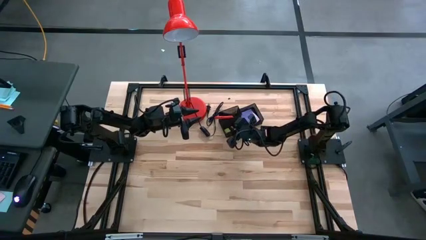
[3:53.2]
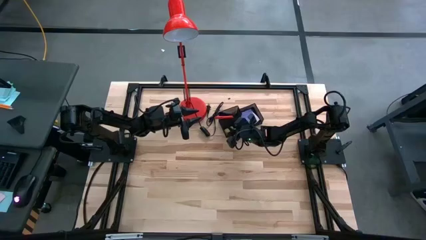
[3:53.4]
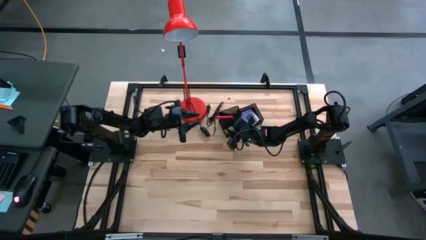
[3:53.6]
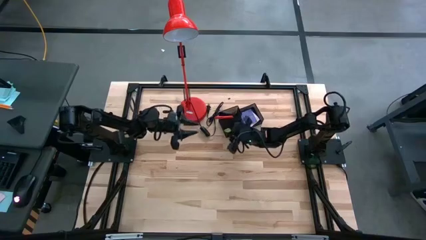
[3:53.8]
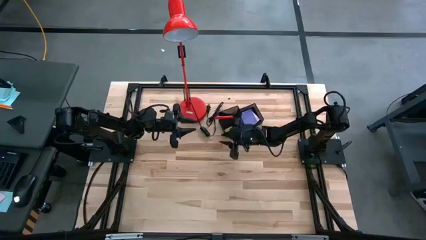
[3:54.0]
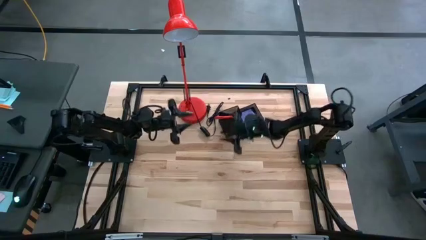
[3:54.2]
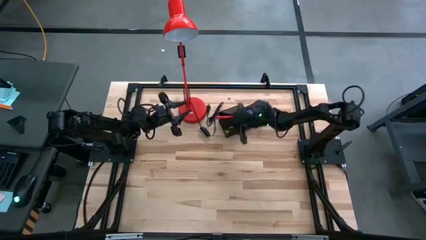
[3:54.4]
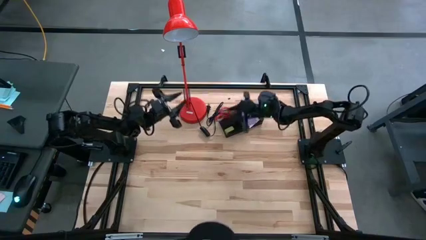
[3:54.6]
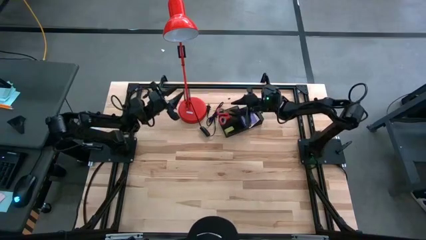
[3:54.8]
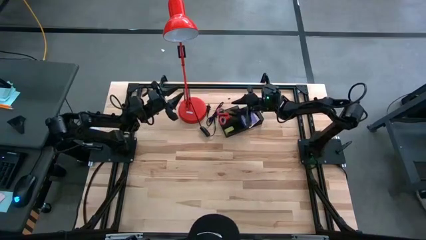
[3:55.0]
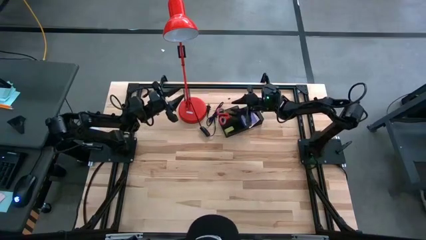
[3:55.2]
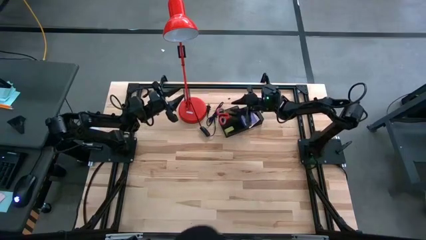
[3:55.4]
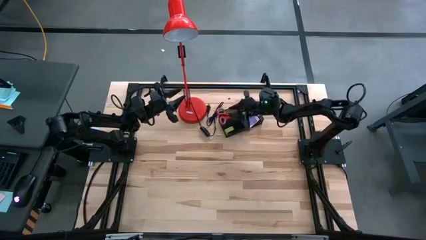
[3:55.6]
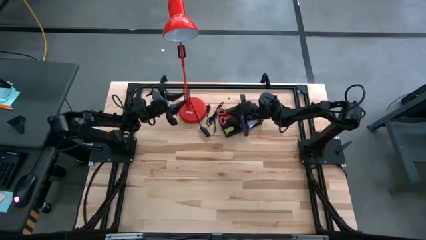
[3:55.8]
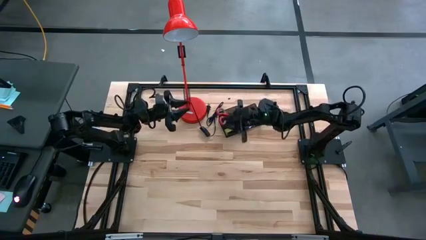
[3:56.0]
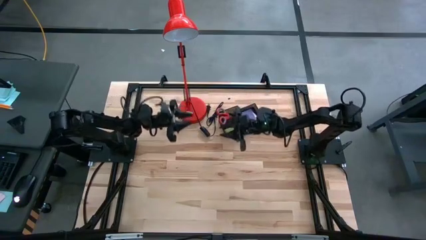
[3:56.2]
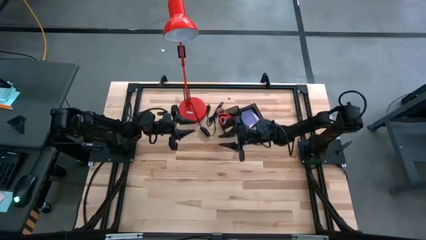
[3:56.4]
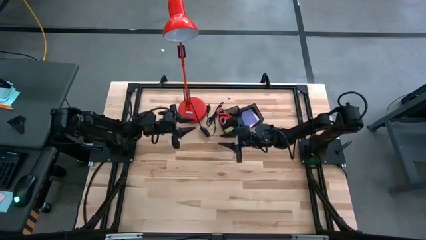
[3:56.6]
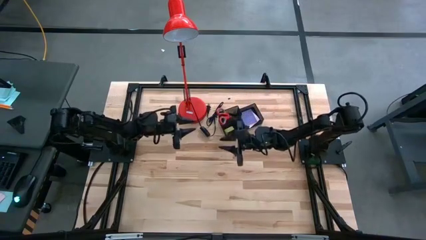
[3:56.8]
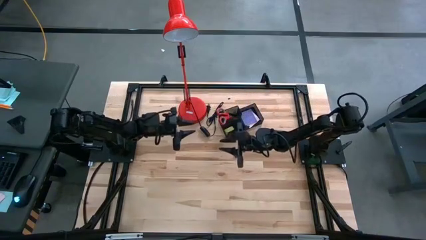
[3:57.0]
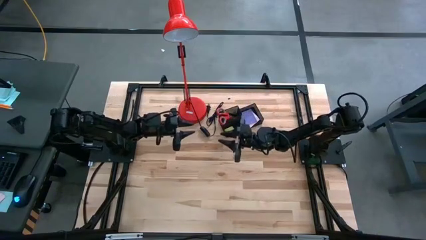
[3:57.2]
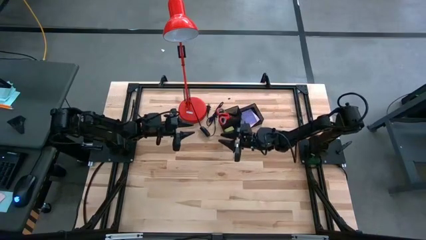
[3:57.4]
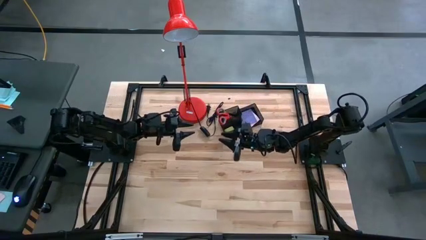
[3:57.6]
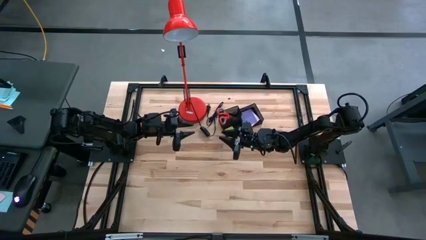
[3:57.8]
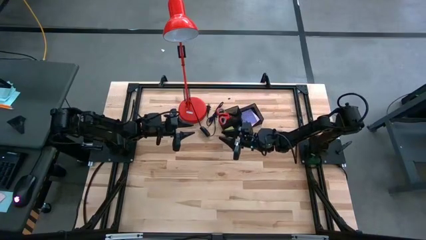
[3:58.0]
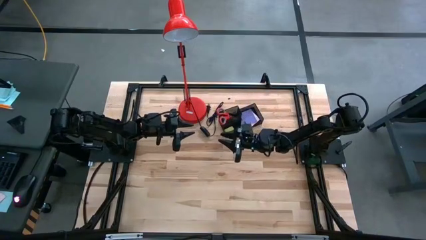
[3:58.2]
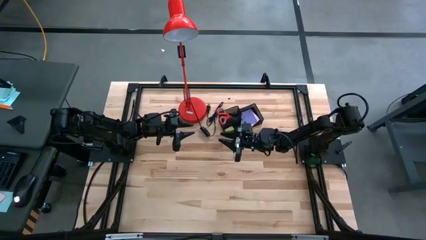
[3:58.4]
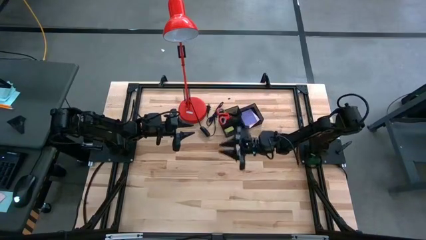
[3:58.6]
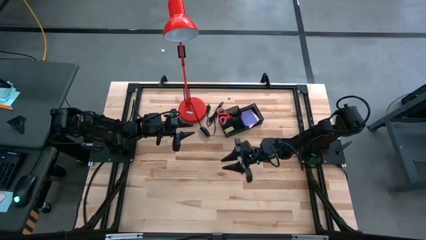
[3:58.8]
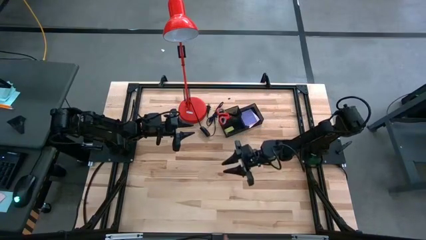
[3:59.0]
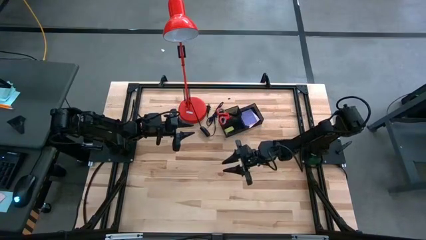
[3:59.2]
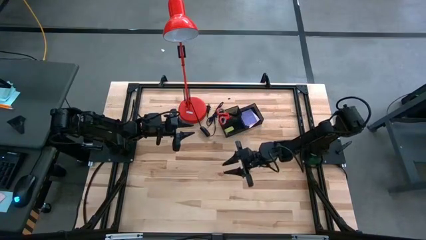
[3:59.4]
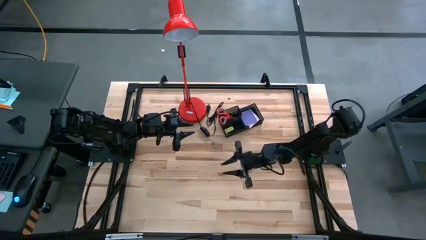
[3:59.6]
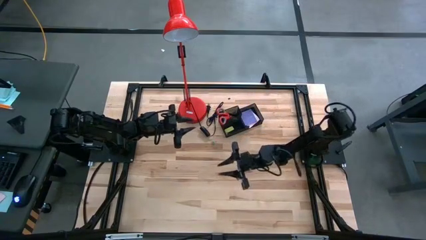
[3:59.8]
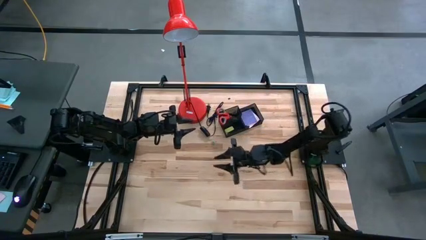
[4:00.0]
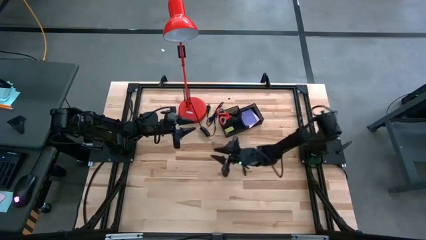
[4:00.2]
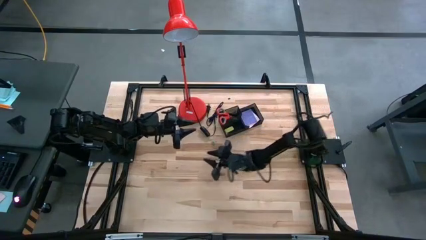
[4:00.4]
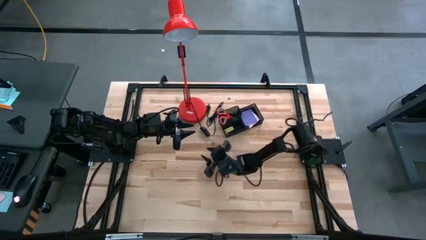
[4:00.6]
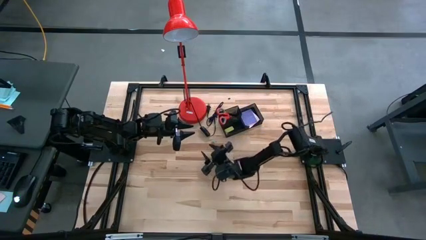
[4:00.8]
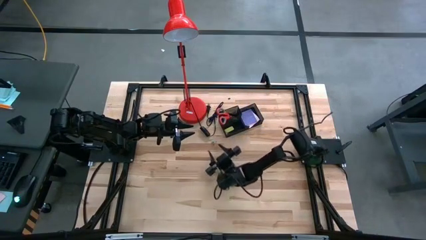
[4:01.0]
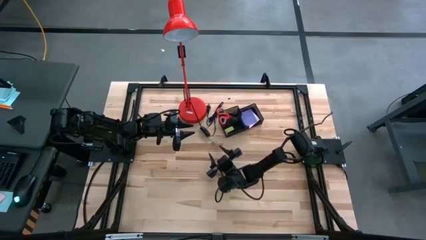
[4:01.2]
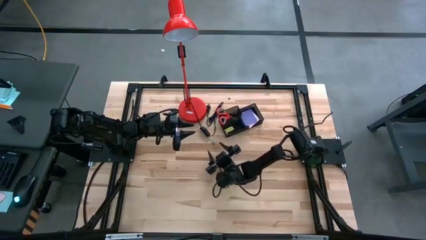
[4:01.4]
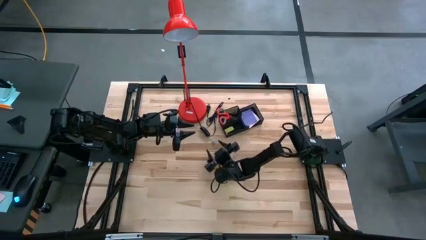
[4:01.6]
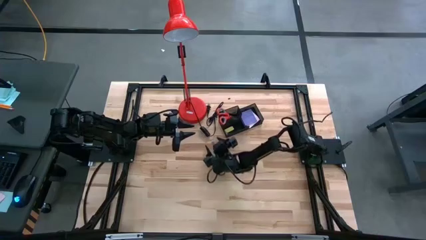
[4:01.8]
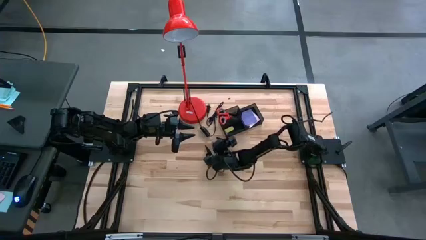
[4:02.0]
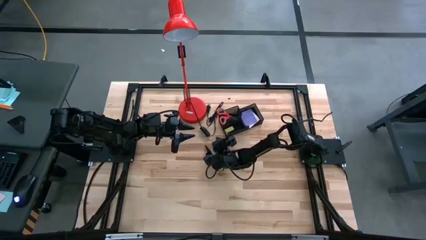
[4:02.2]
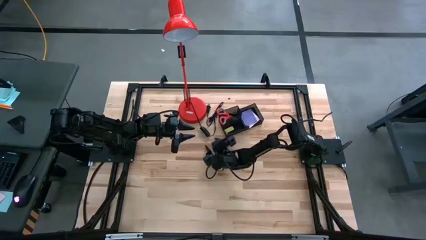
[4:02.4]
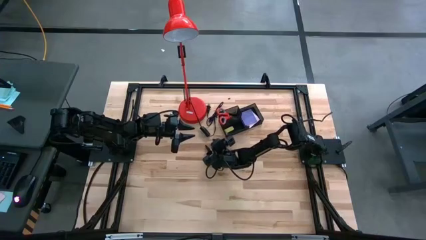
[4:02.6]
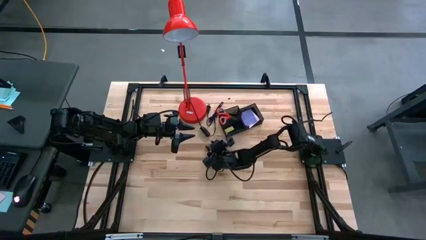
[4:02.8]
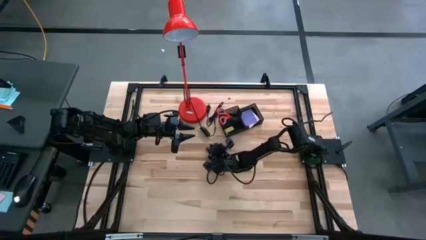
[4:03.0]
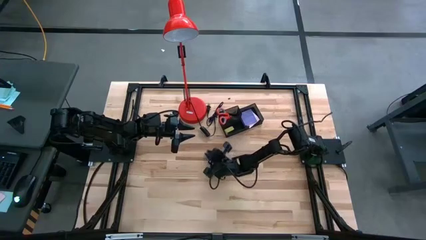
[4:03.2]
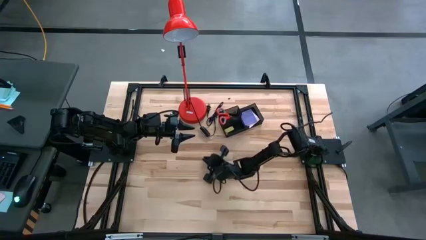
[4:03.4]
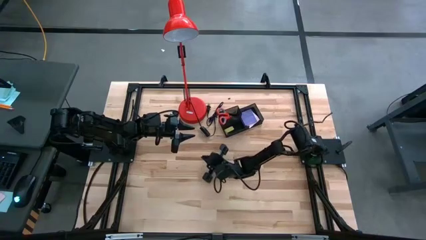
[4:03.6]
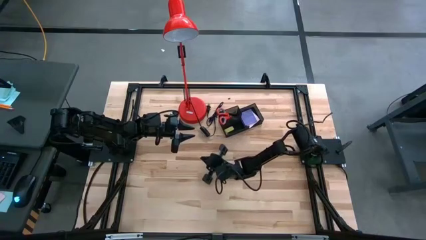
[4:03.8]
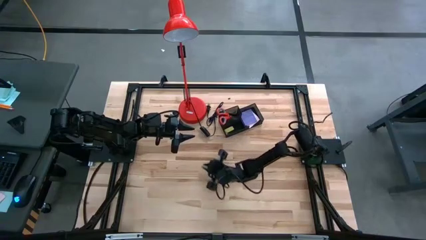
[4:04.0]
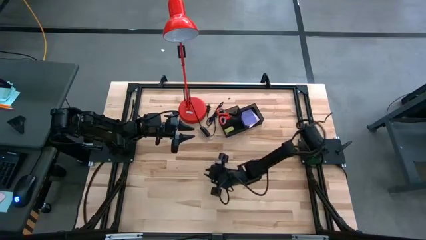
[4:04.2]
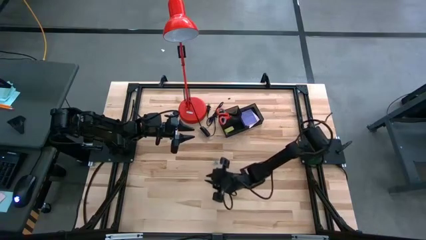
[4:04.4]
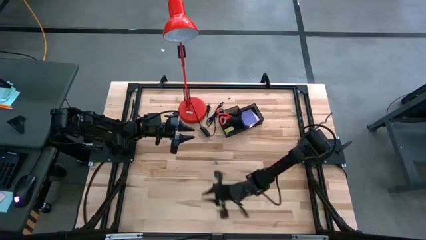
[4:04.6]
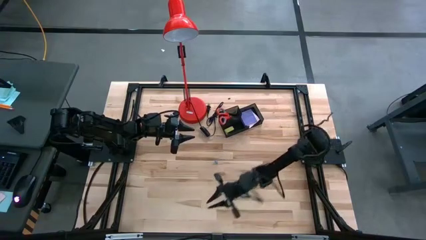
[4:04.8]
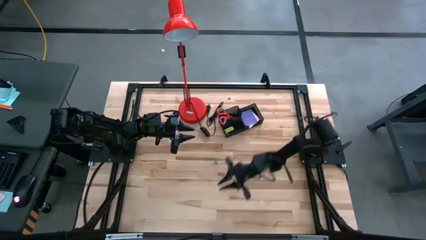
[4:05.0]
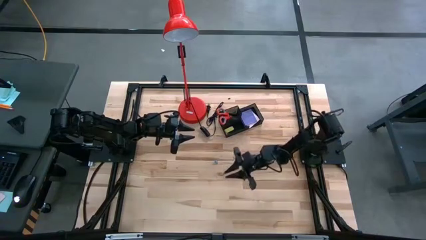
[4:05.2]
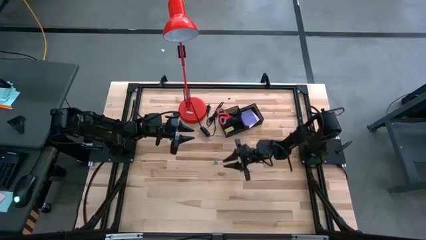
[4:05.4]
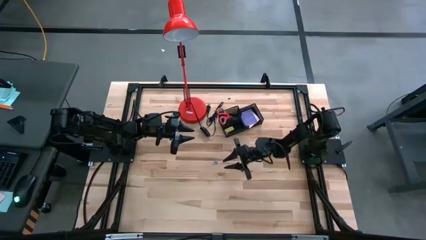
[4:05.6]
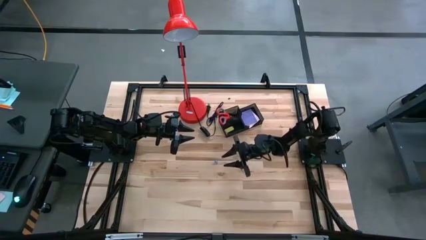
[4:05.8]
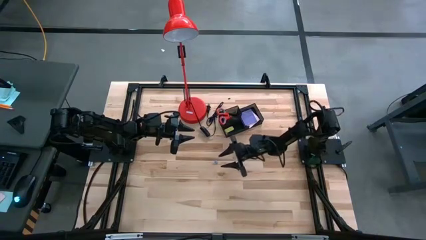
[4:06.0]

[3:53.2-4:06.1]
Task: Pick and place office supplies into organizer
Return to Home Position
